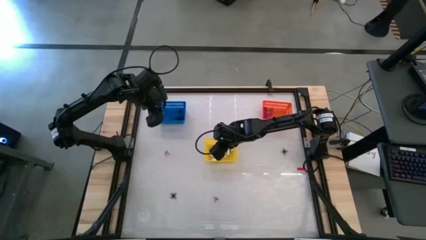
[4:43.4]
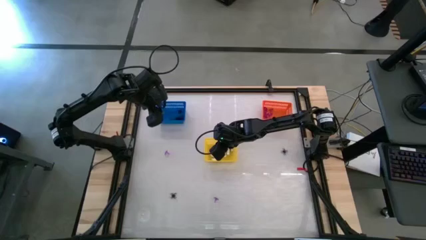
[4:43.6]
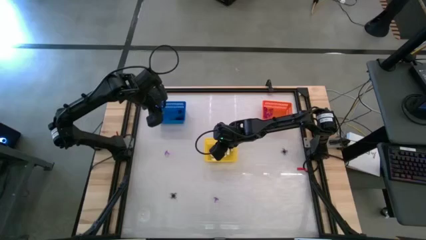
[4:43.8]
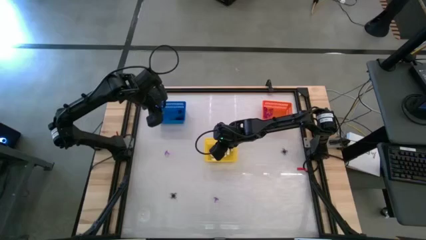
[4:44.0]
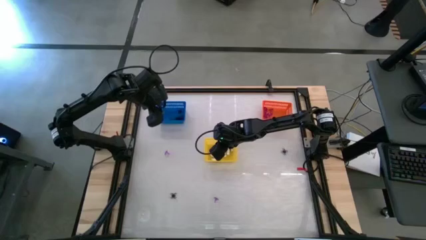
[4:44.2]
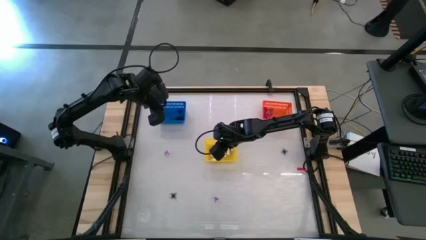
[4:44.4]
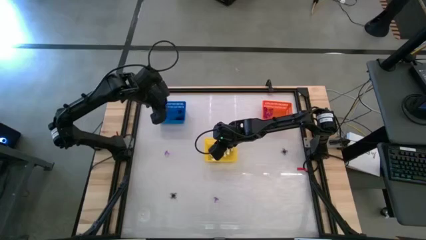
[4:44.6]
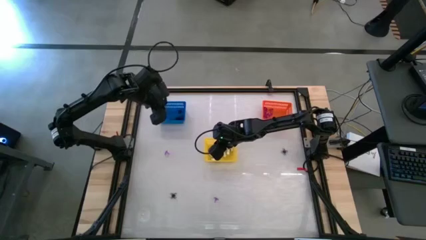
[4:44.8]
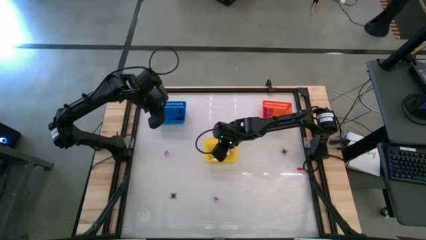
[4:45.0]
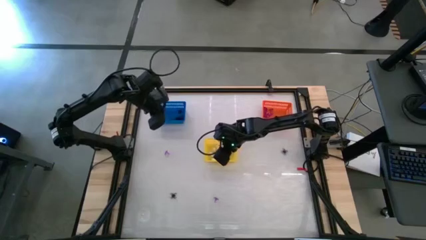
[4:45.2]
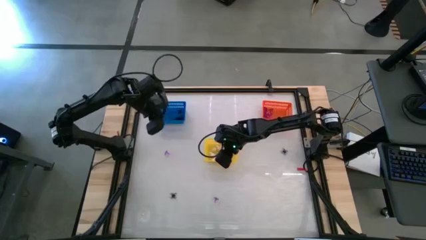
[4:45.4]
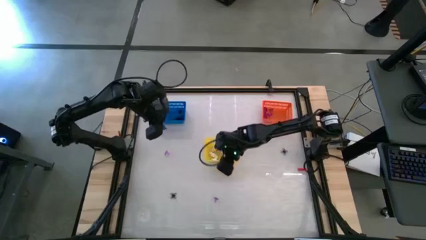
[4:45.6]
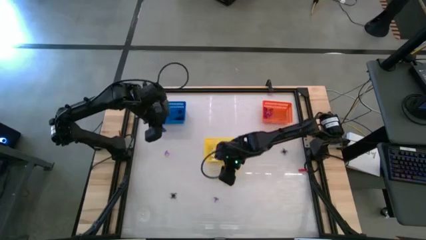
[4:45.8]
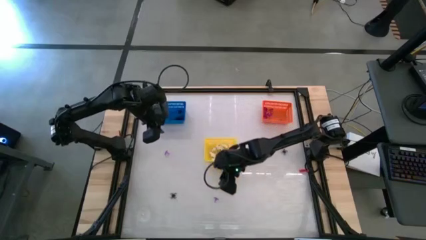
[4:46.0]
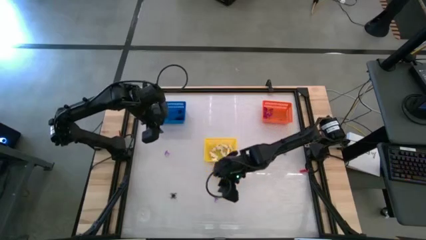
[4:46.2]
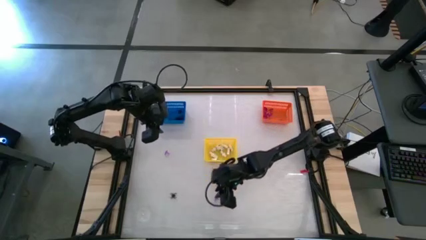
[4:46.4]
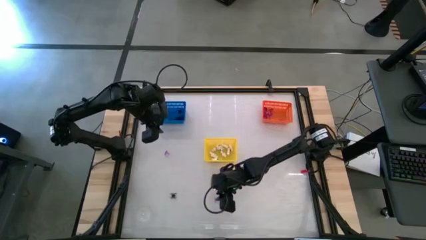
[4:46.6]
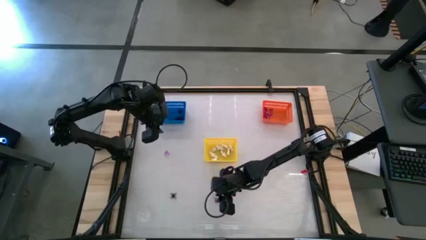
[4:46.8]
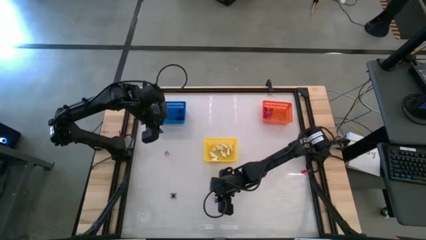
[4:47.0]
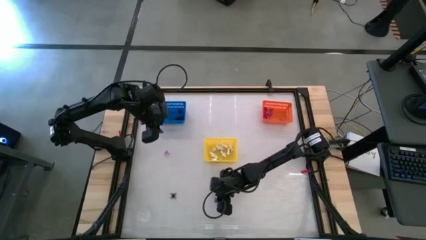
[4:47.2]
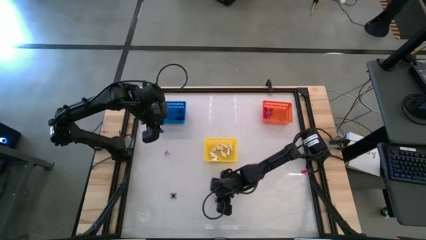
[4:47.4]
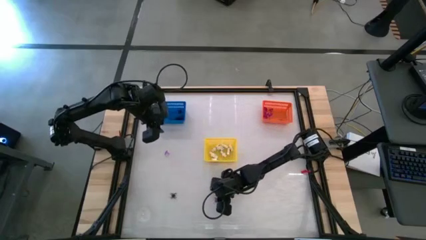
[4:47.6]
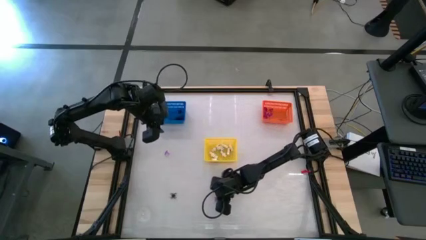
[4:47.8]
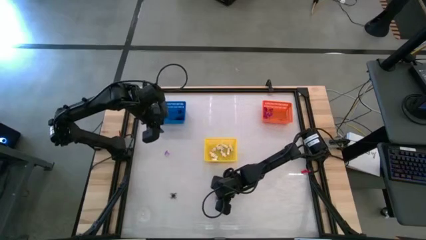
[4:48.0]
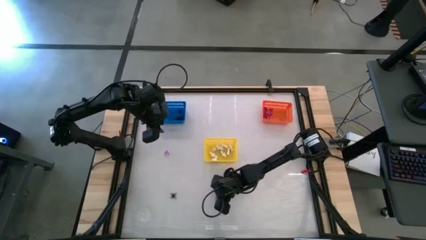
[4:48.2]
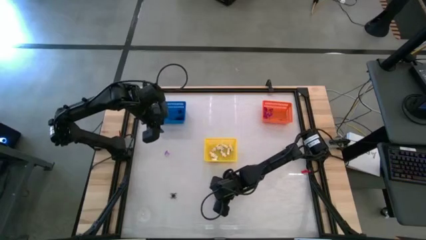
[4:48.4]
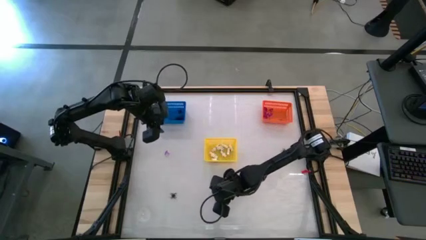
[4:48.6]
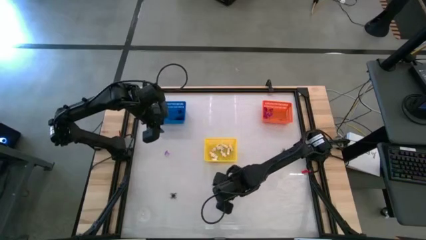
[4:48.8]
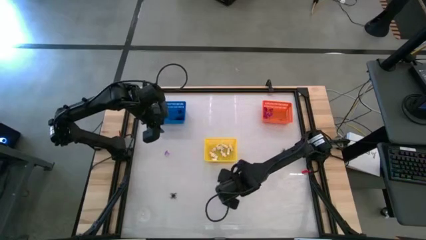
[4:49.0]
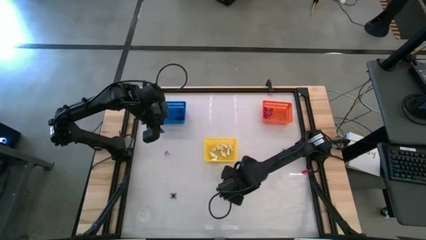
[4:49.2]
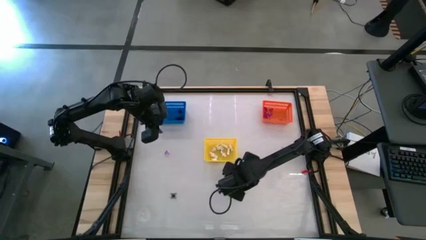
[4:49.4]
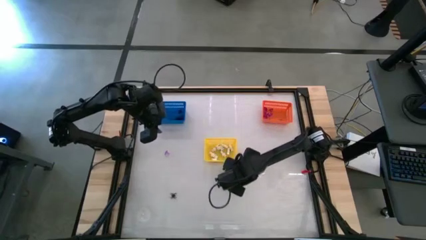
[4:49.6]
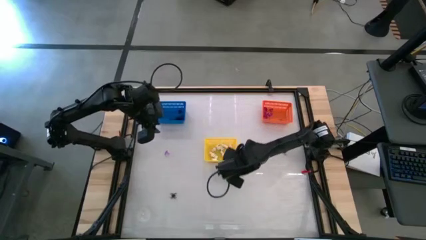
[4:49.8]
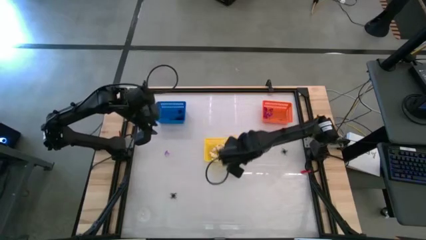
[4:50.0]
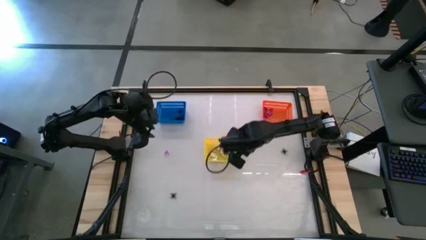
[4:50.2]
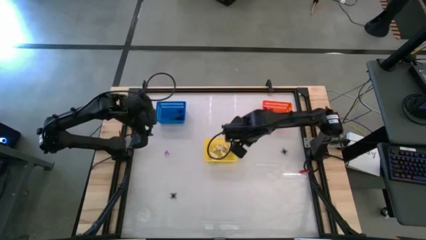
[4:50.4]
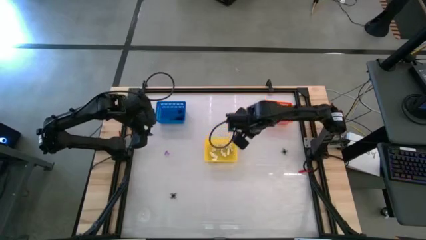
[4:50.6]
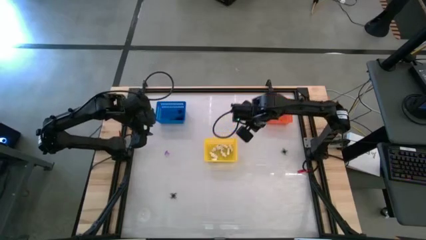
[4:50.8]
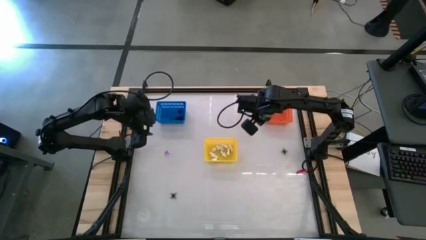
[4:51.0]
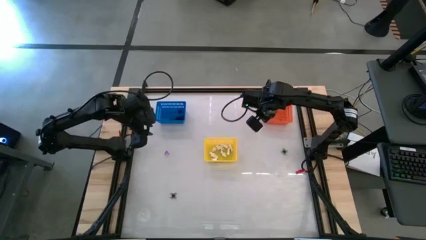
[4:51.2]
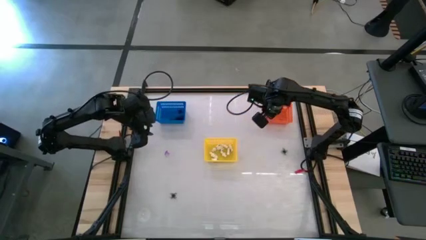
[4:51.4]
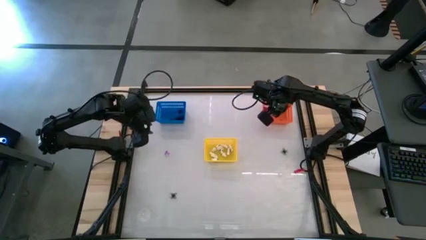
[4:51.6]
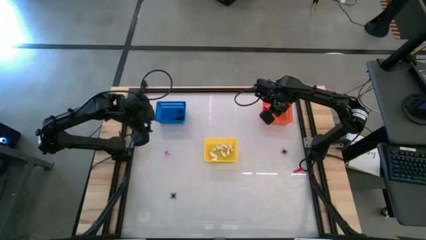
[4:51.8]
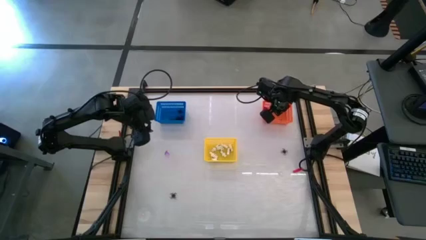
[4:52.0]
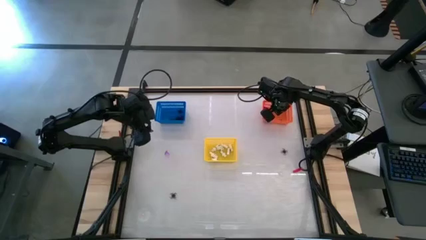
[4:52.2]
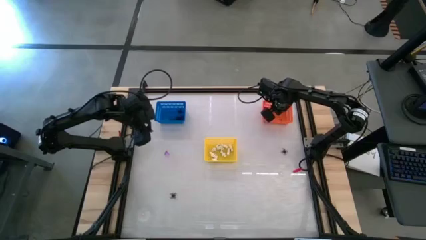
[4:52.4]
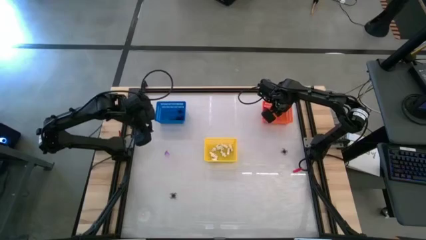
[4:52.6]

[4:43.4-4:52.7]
Task: Sort Halloween decoration
Put the purple witch hat toy into the orange bin

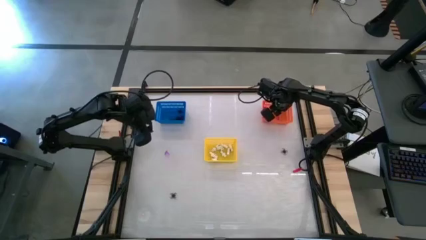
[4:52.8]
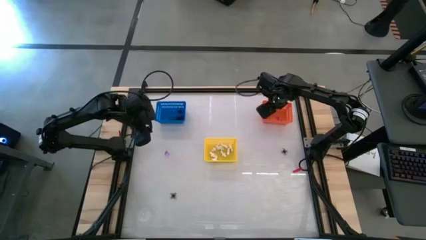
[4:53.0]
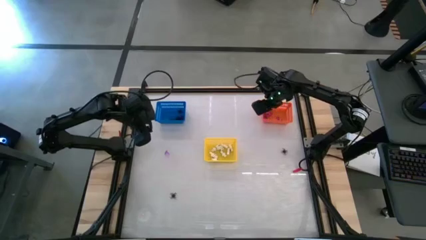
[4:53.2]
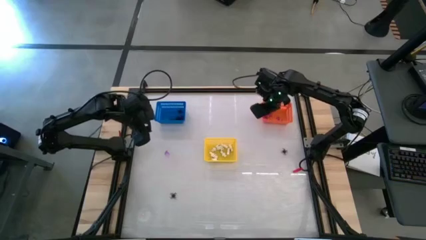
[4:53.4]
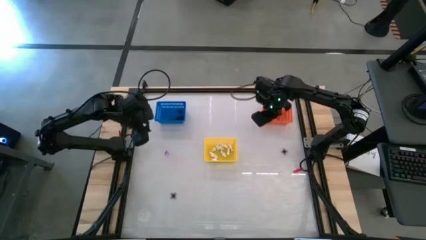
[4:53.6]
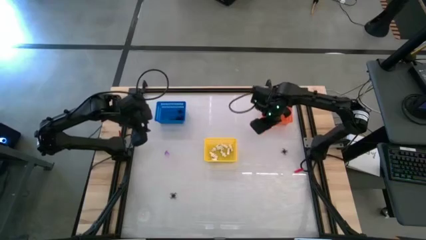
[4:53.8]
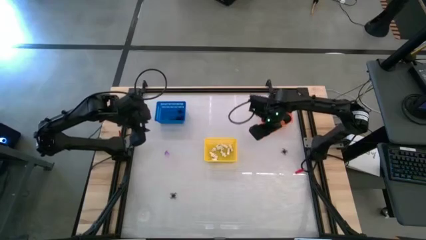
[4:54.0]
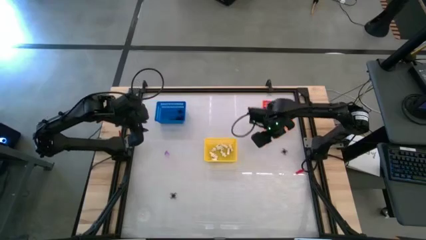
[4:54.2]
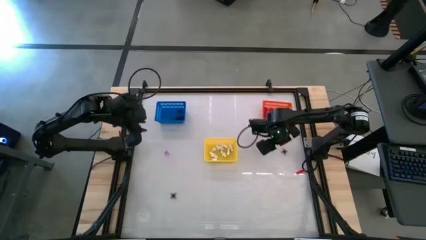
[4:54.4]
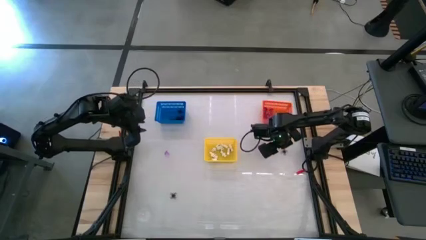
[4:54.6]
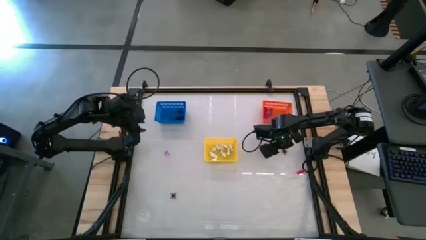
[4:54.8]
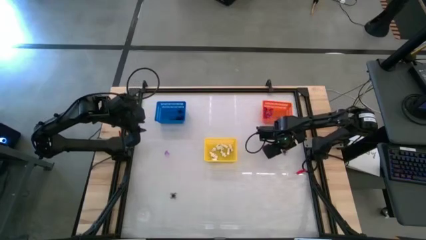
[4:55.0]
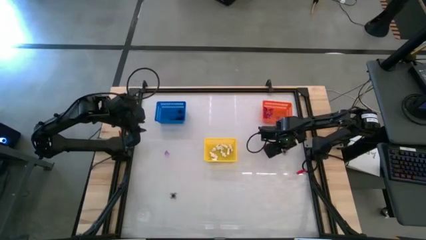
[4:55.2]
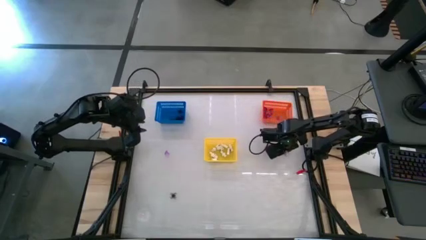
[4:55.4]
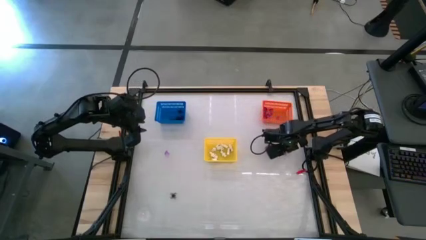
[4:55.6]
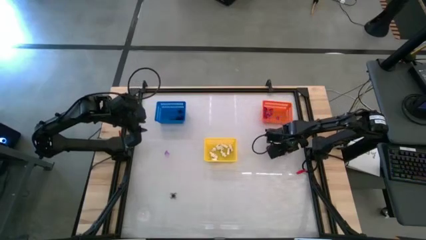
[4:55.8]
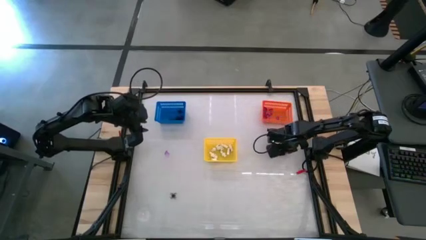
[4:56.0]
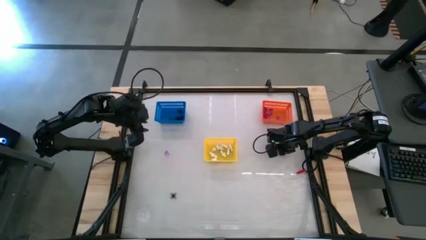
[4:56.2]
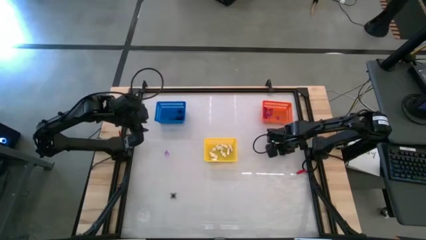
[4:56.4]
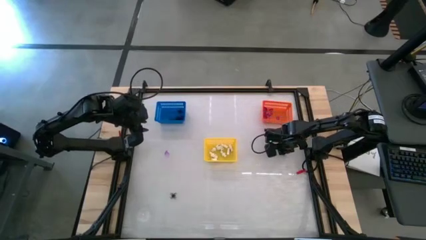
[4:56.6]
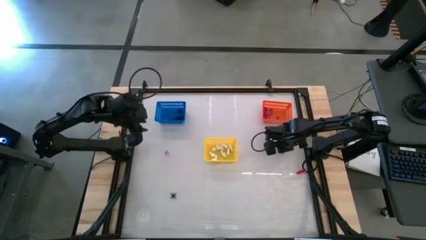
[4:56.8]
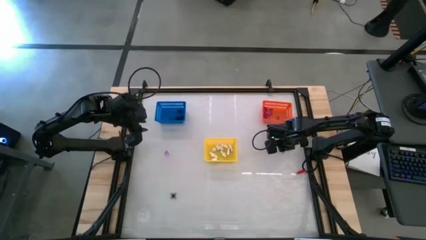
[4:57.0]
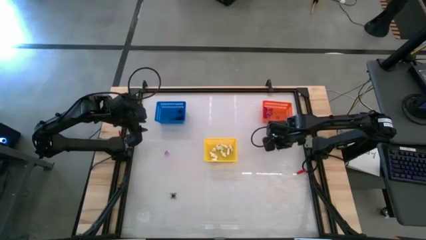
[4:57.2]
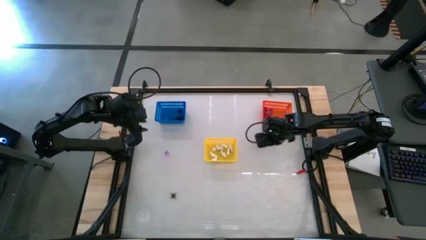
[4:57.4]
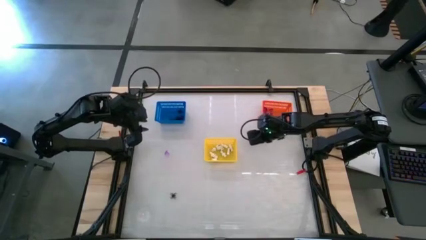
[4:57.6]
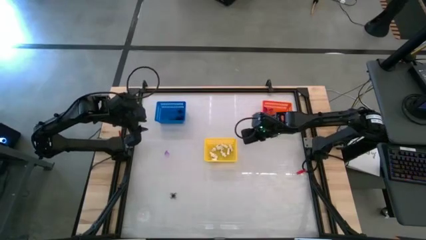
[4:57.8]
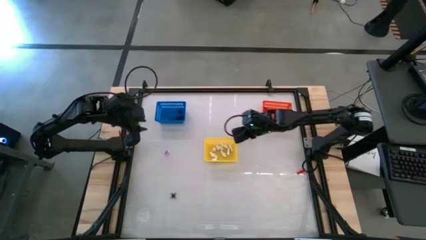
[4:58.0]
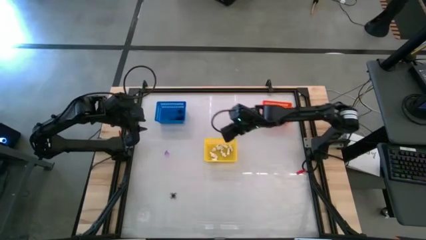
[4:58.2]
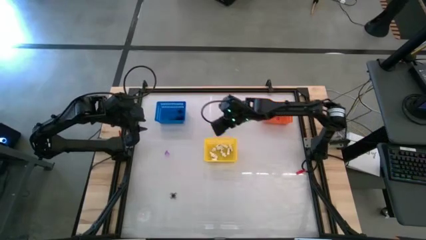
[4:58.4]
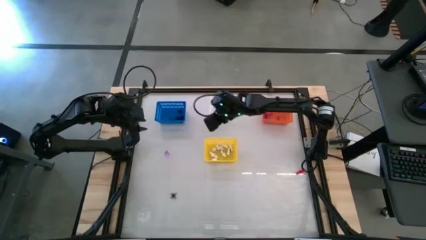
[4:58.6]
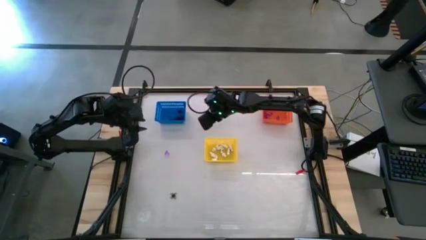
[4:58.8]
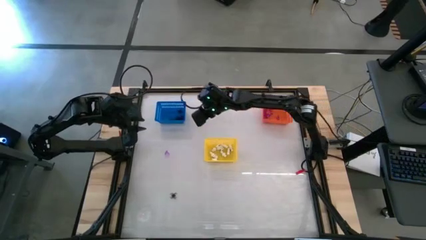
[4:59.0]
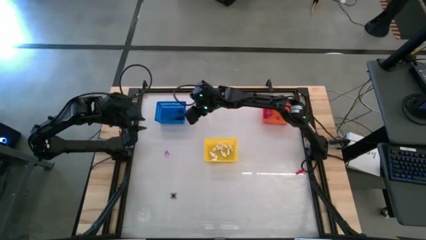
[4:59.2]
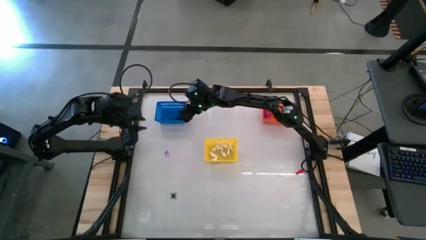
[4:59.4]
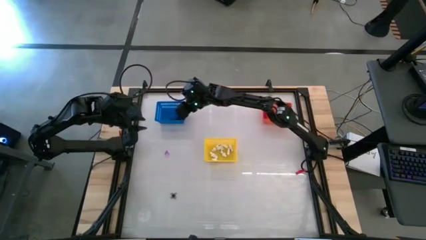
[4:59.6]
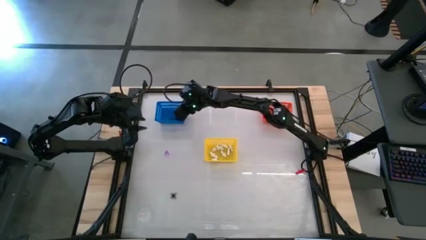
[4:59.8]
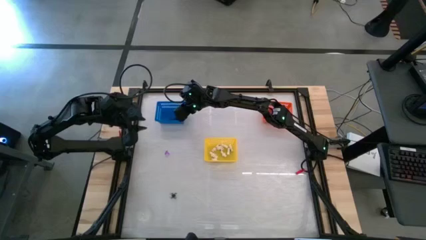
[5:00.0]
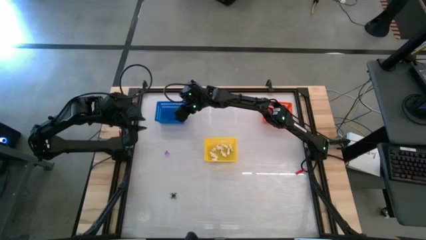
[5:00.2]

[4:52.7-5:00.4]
Put the black spider toy into the blue bin
